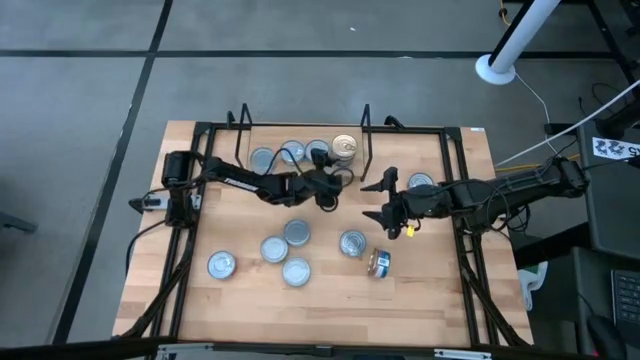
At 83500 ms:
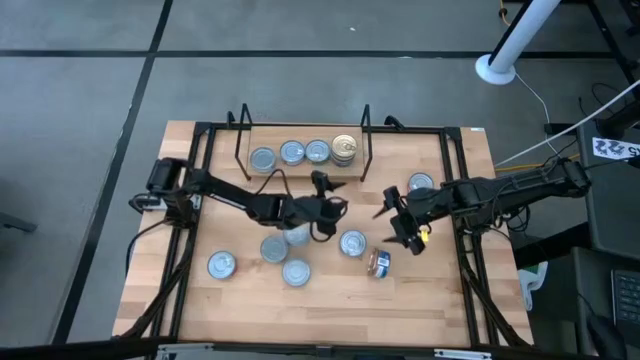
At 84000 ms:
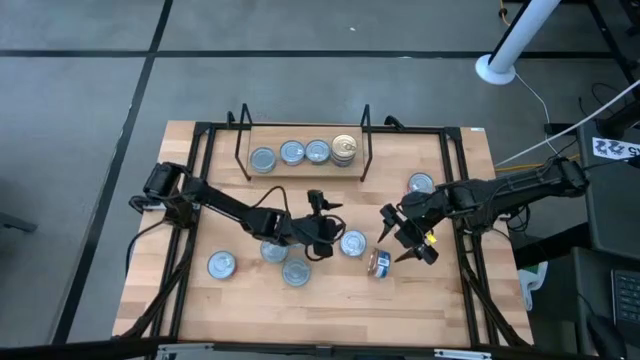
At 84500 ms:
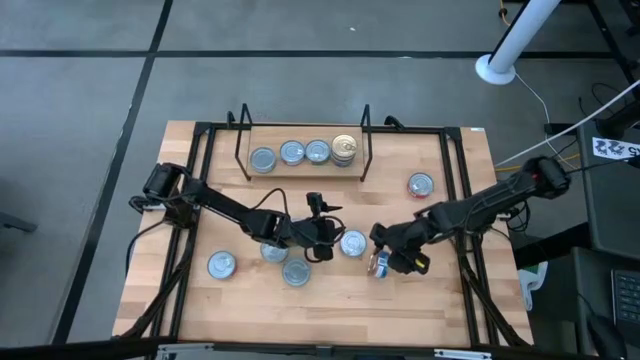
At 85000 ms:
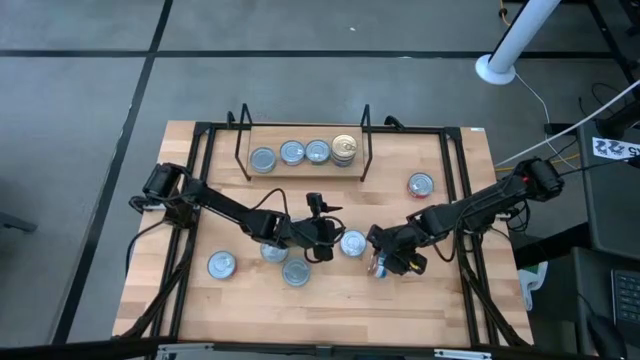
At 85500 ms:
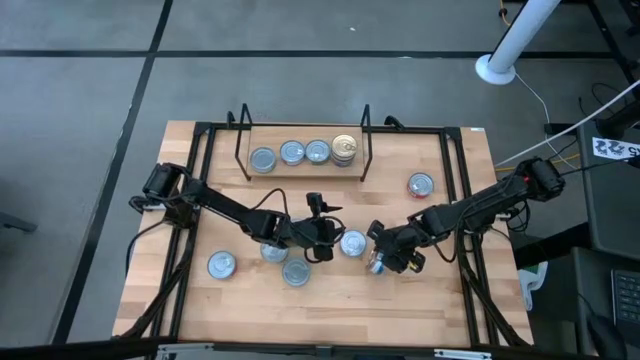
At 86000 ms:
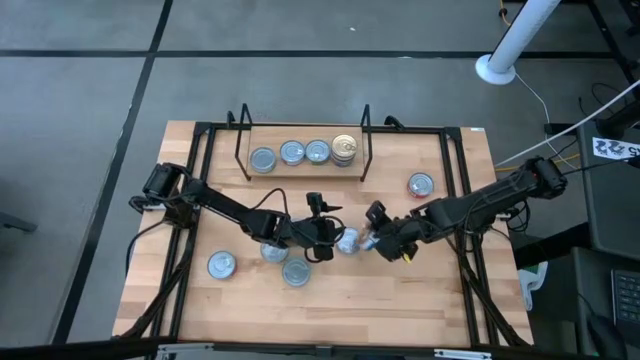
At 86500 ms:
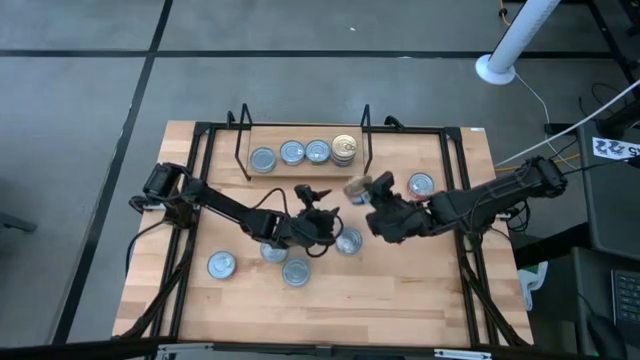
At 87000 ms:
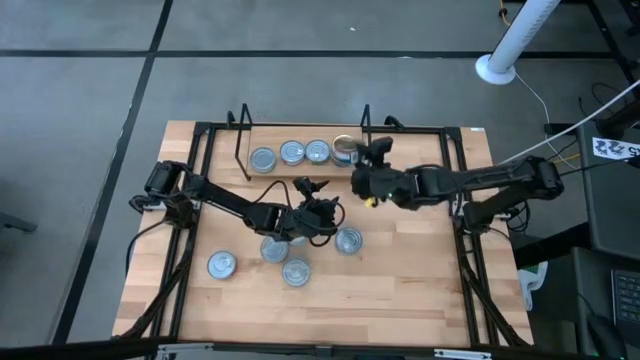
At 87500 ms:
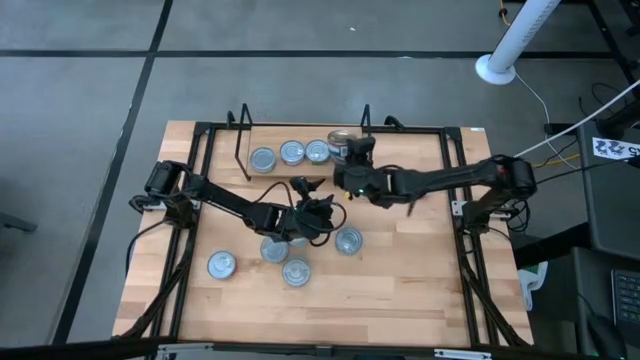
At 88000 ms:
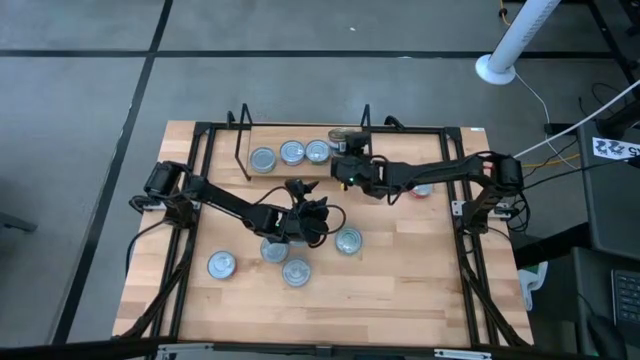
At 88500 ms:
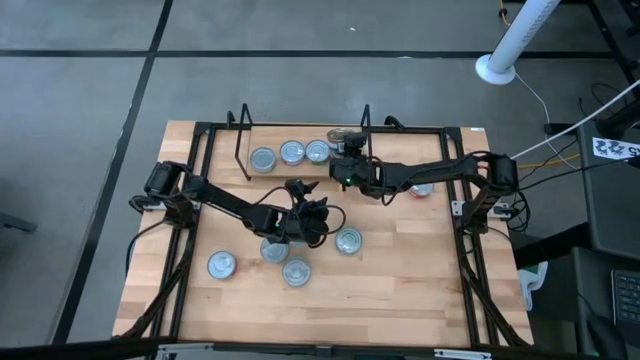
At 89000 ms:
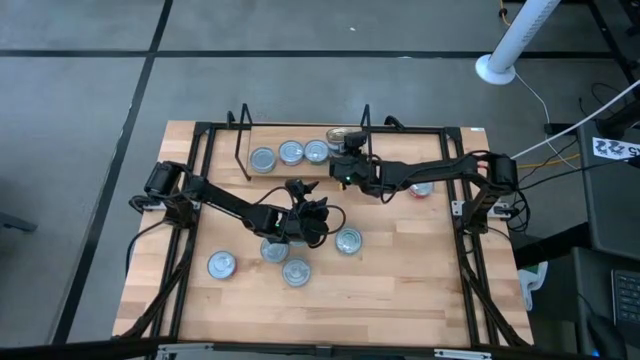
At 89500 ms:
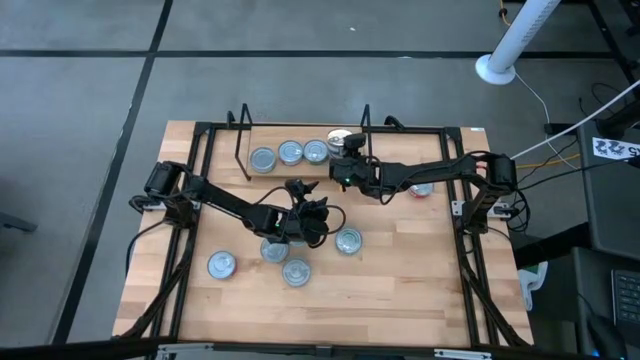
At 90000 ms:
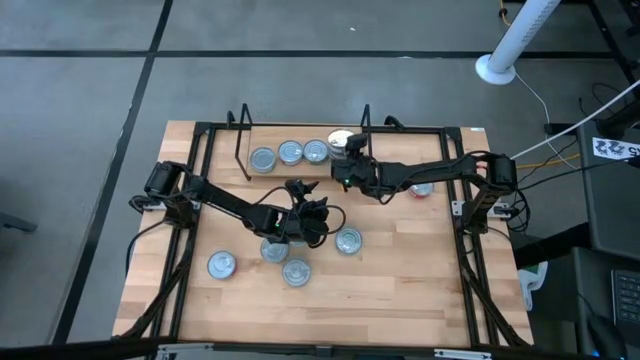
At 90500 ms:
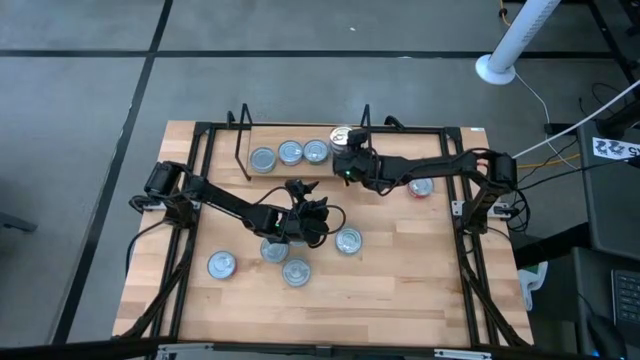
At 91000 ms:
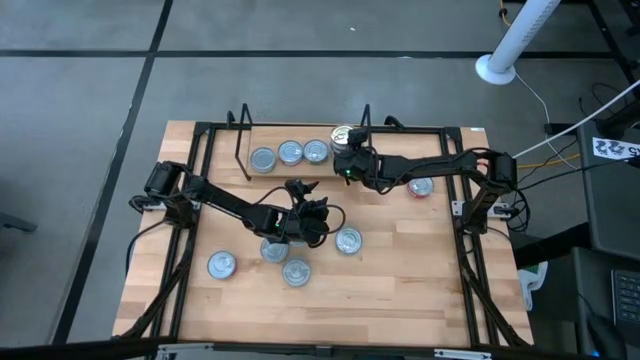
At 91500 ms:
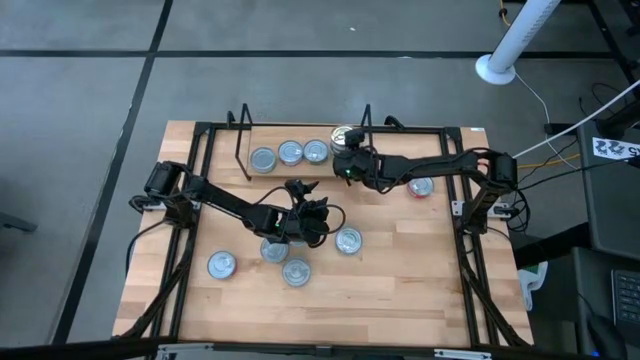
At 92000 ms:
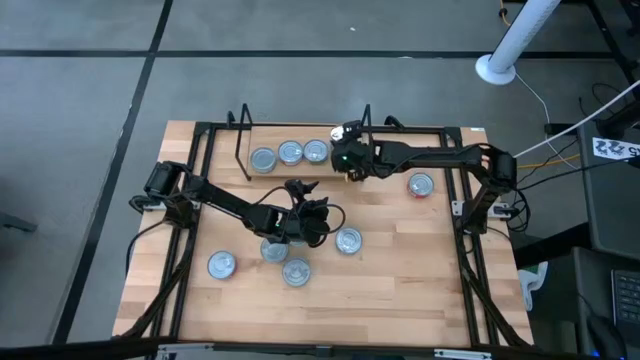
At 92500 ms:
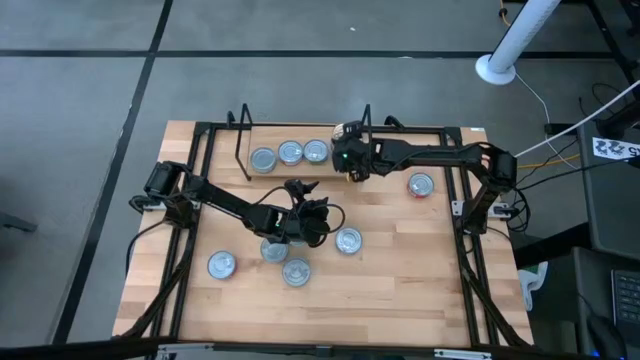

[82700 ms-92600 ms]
Task: Stack canned seafood by type on shelf
Stack the blue-pink tuna can on top of the blue-pink tuna can on the shelf

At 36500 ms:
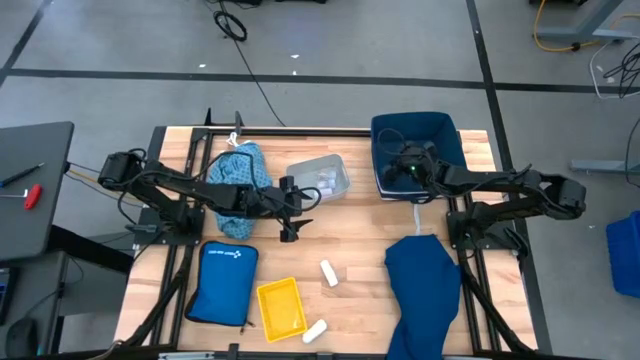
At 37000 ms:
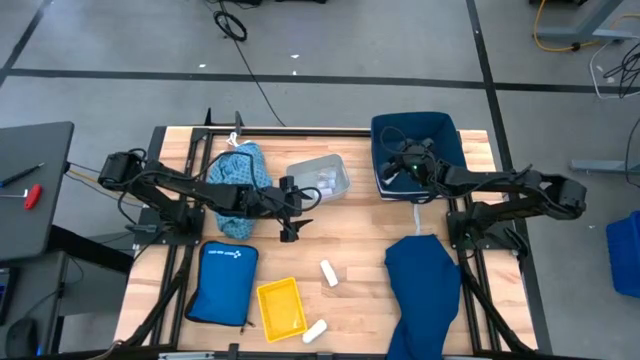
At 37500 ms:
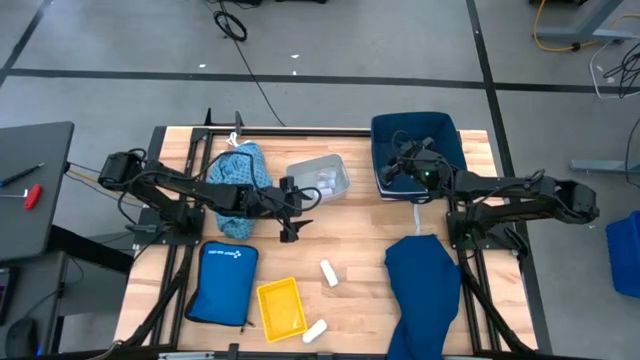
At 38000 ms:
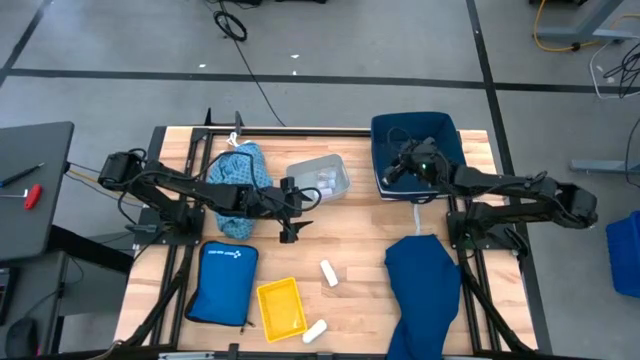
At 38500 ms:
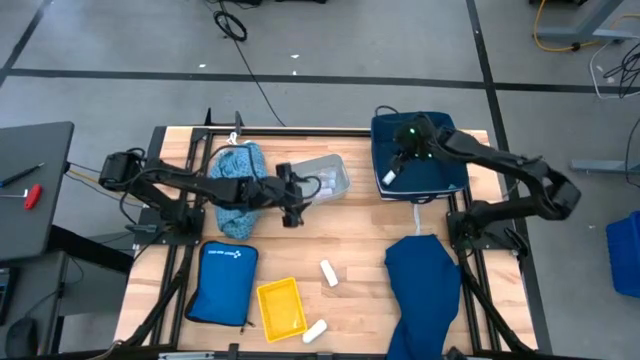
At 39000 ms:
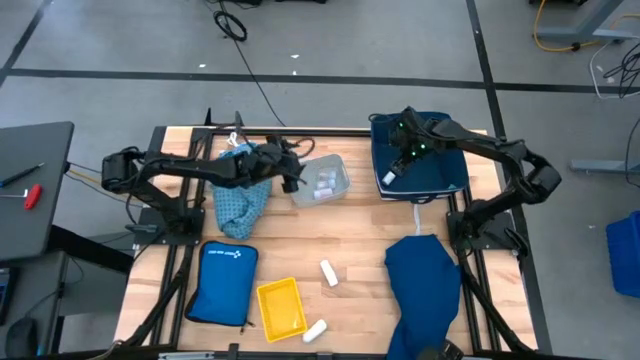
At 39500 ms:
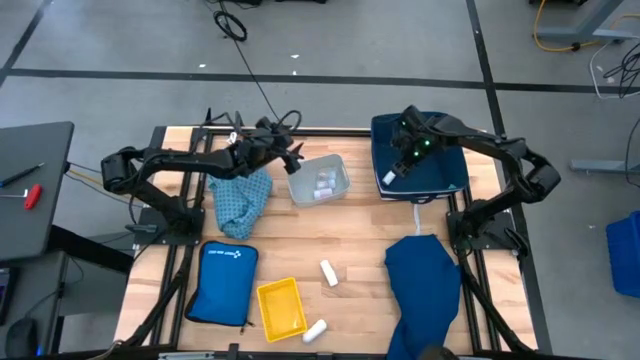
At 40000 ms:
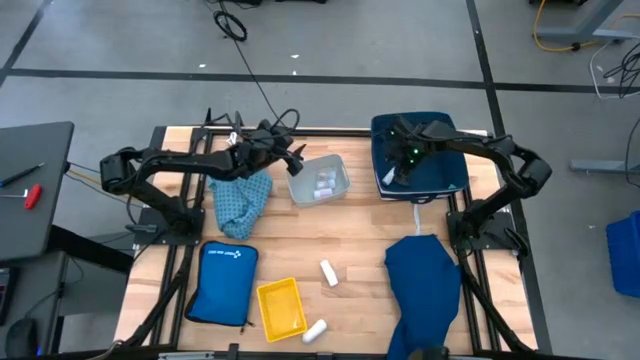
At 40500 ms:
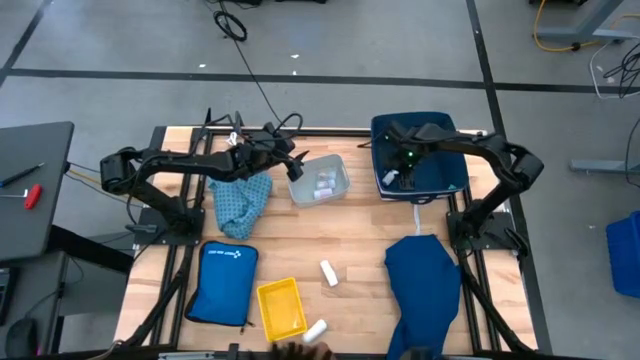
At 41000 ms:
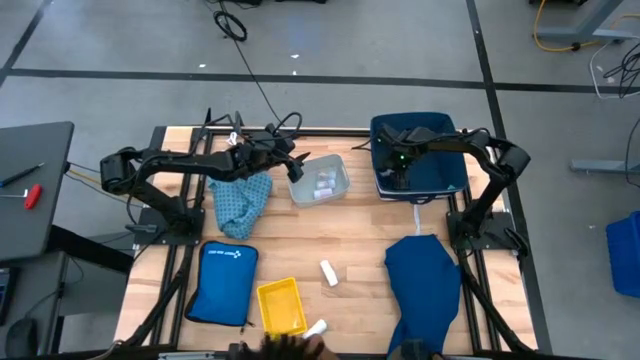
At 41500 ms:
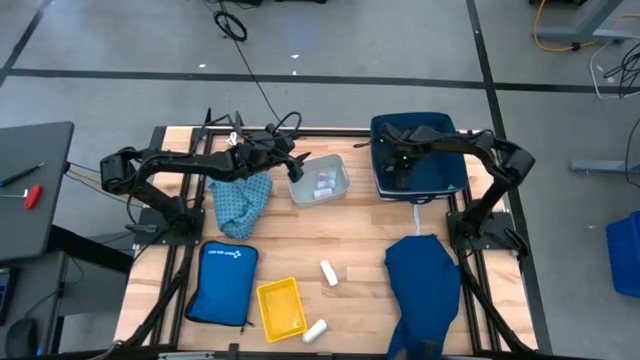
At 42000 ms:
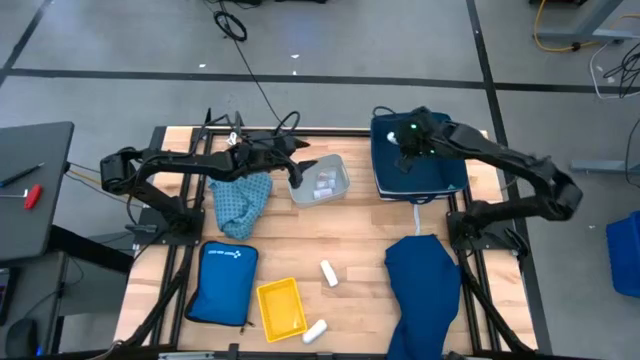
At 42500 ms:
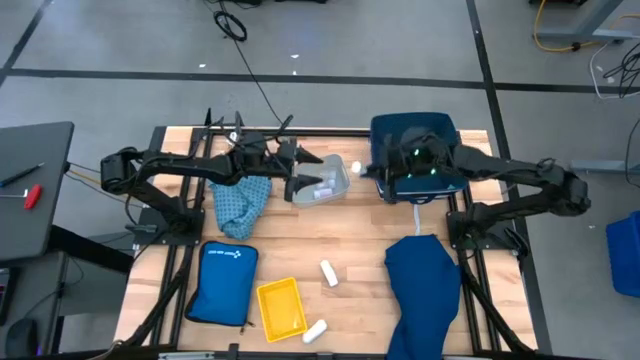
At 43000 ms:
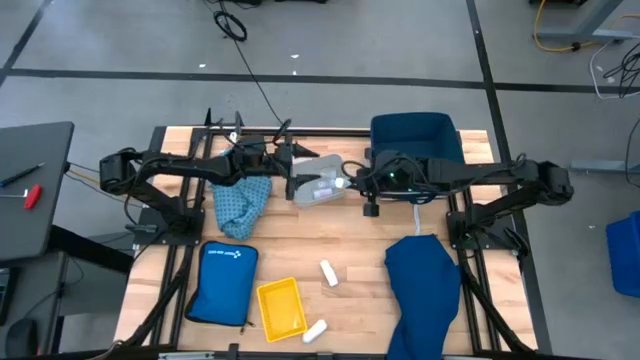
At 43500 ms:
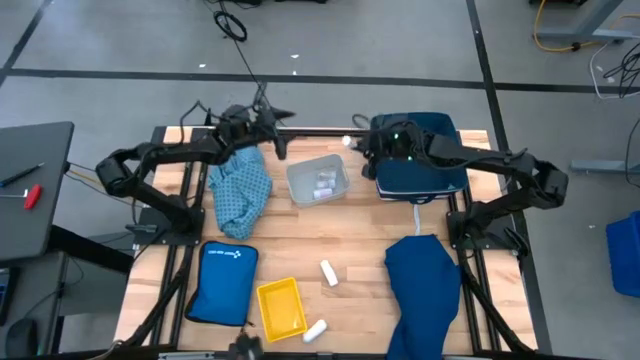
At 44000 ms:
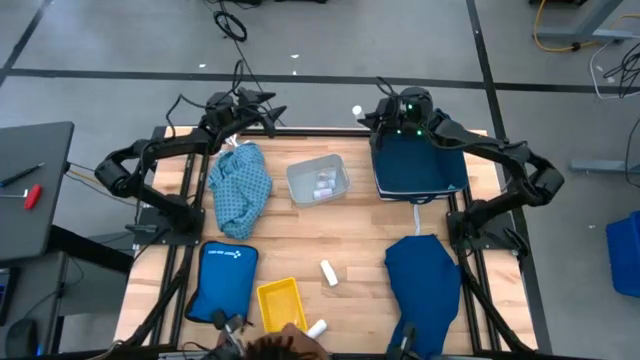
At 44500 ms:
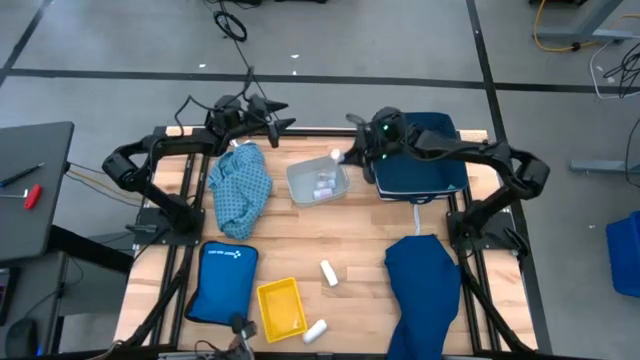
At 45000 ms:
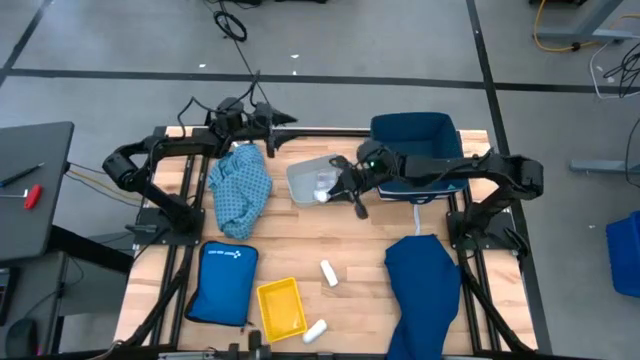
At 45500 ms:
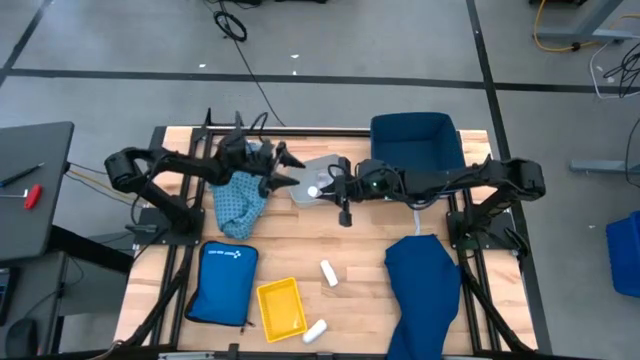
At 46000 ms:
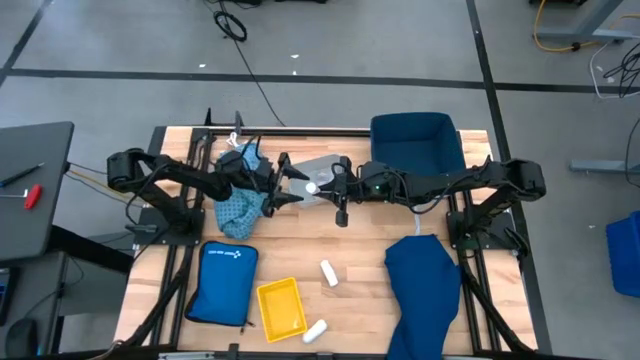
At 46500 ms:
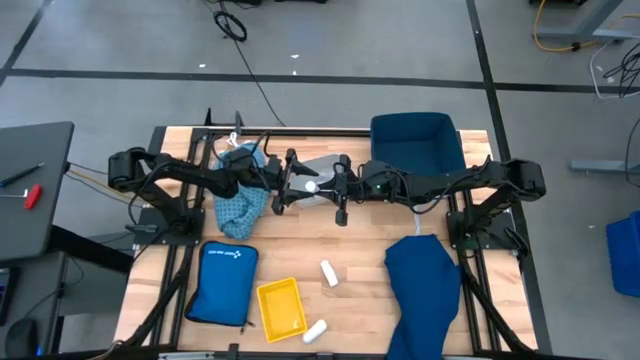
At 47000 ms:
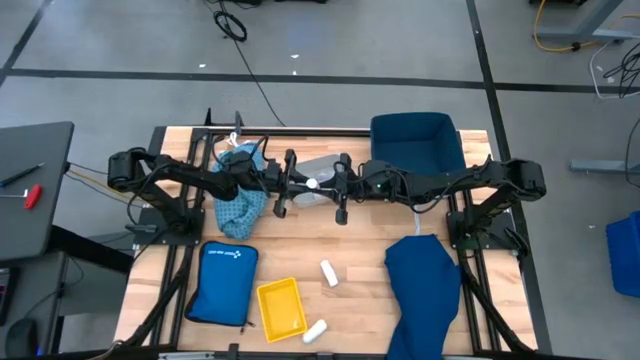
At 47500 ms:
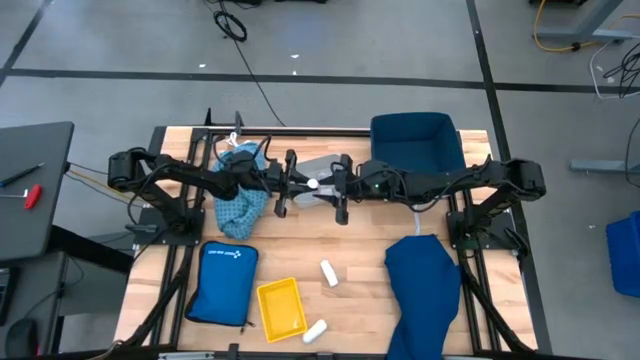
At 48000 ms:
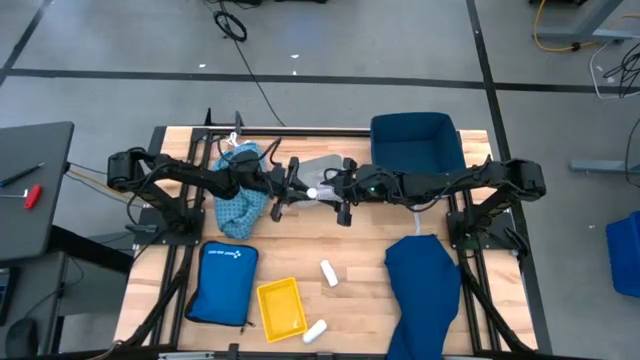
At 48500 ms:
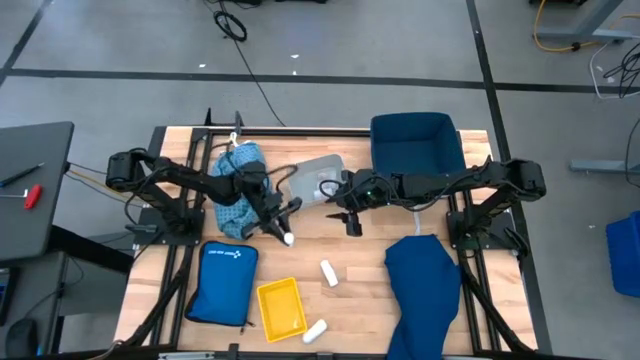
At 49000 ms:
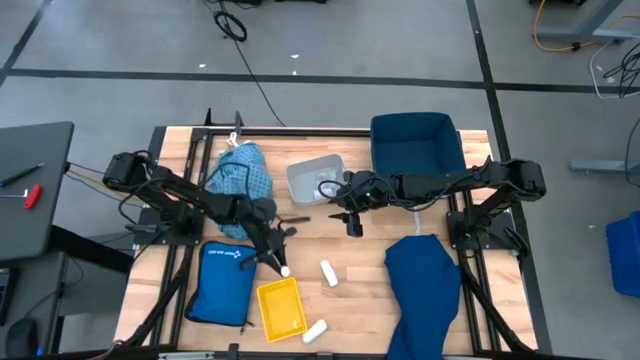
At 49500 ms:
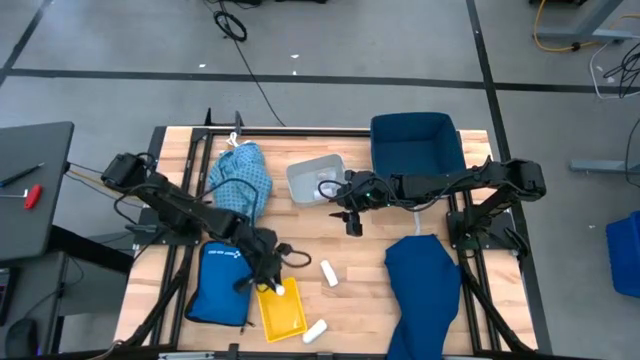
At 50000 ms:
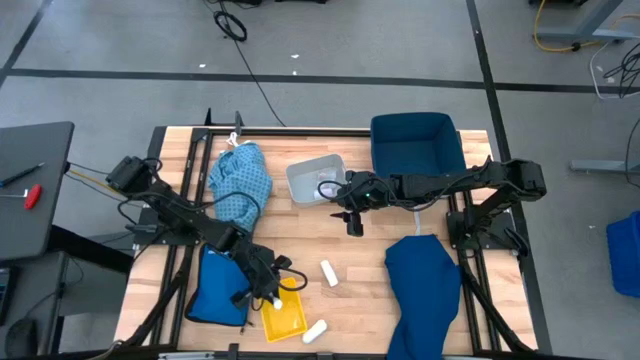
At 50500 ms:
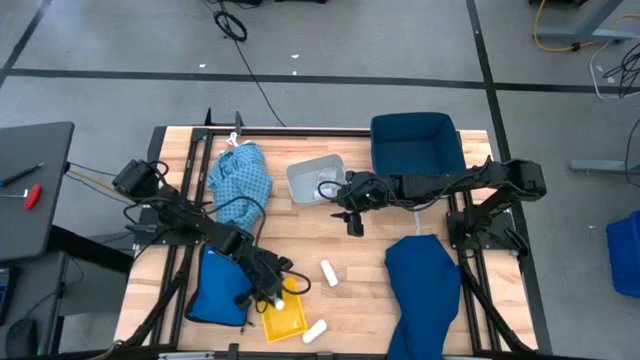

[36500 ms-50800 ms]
Task: Pick & place medical supplies in basket/bin
Put the top rolled gauze into the yellow bin
